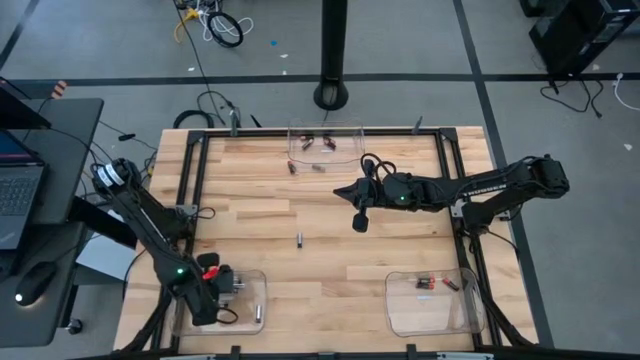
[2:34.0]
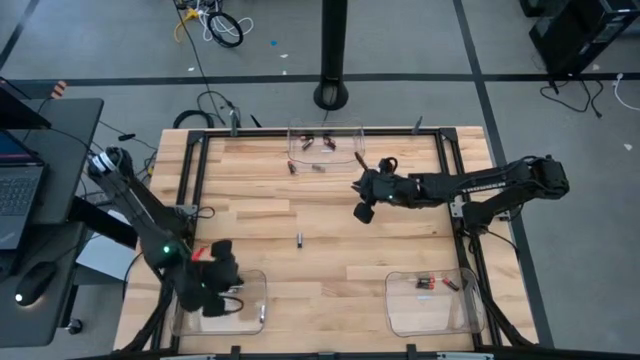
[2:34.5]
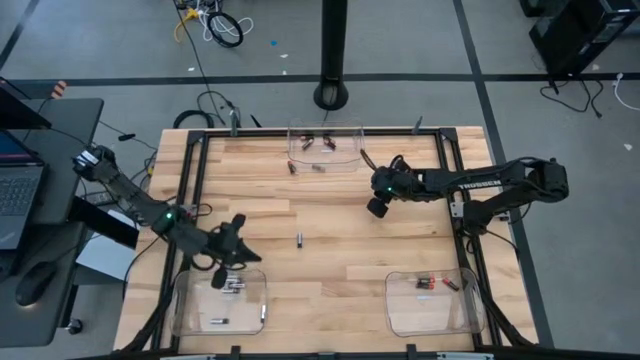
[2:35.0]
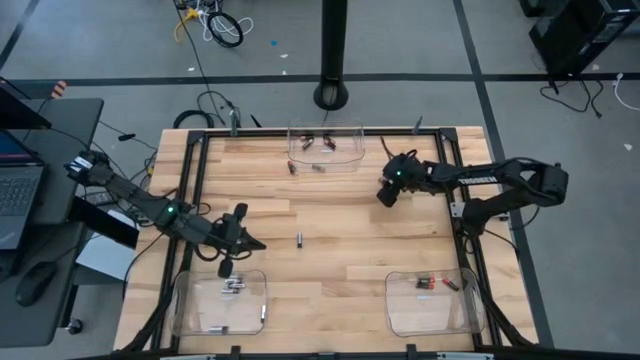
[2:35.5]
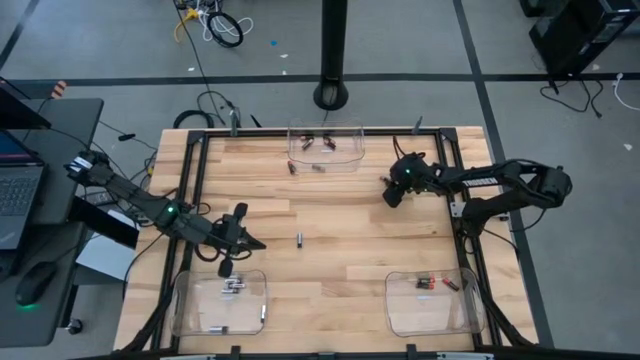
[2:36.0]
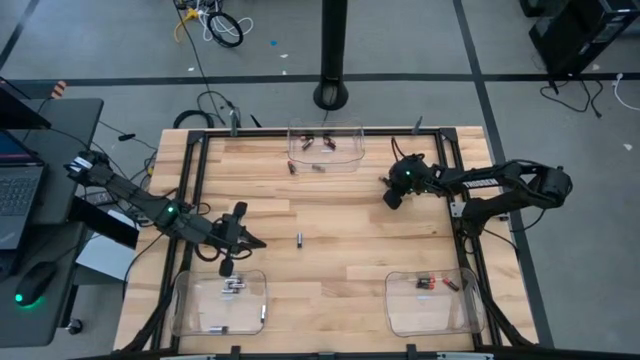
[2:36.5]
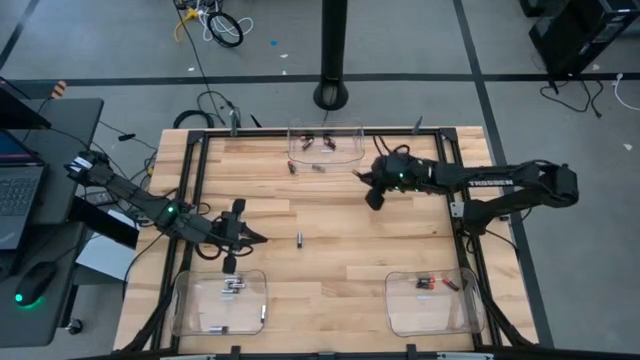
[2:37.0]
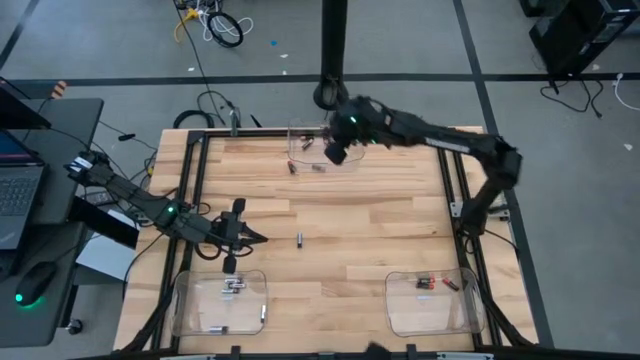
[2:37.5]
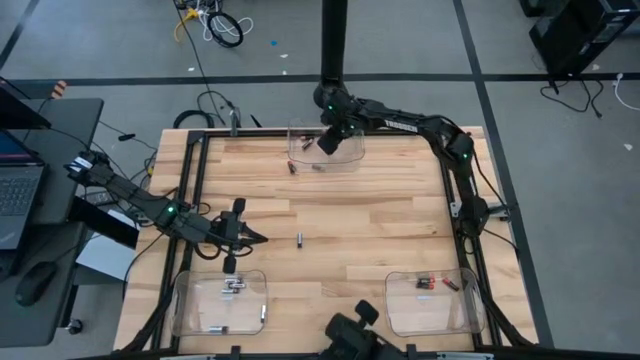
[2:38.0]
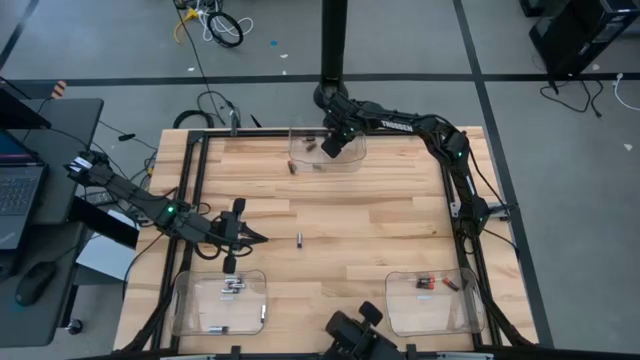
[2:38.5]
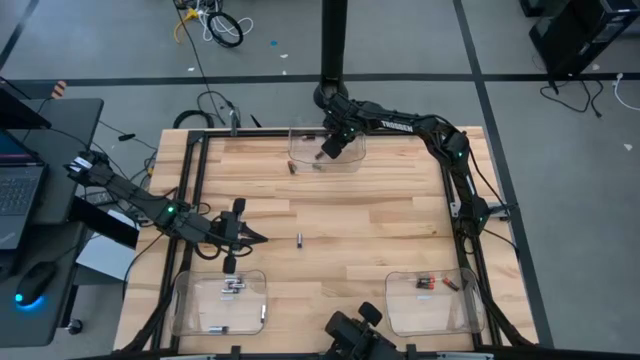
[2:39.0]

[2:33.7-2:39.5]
Task: Sort batteries
Put the brown battery into the top middle transparent bin

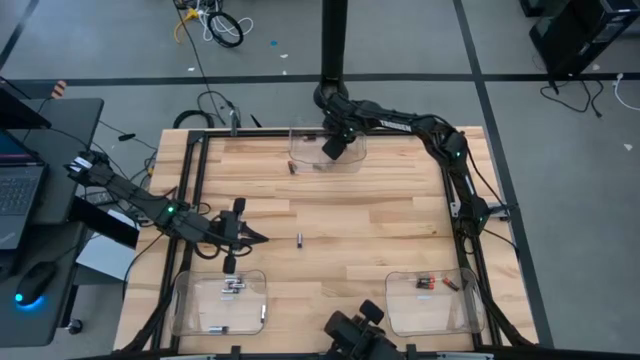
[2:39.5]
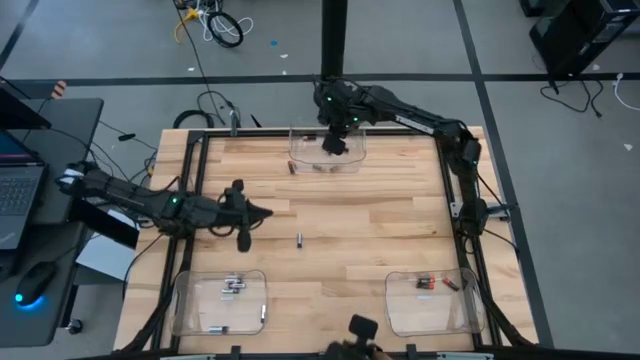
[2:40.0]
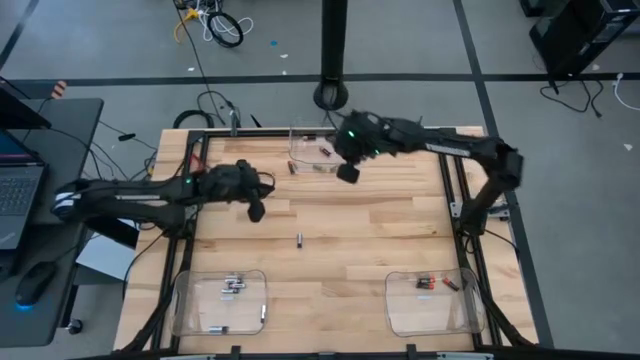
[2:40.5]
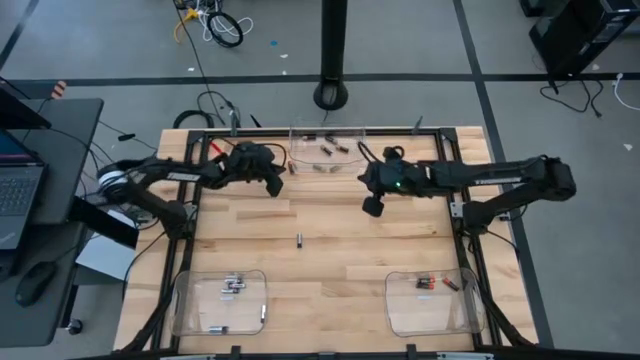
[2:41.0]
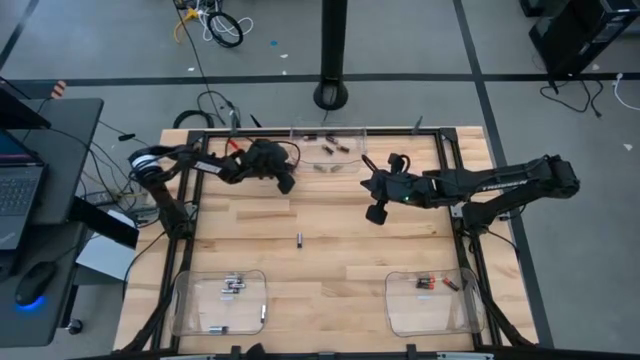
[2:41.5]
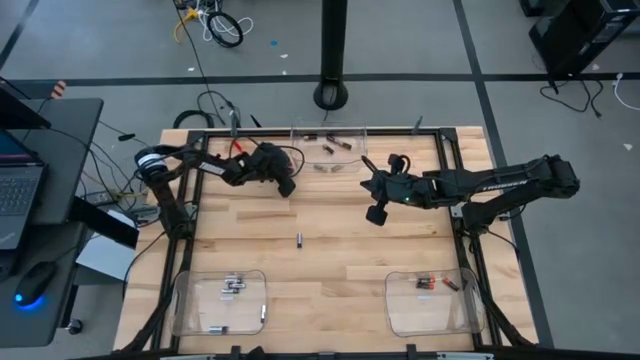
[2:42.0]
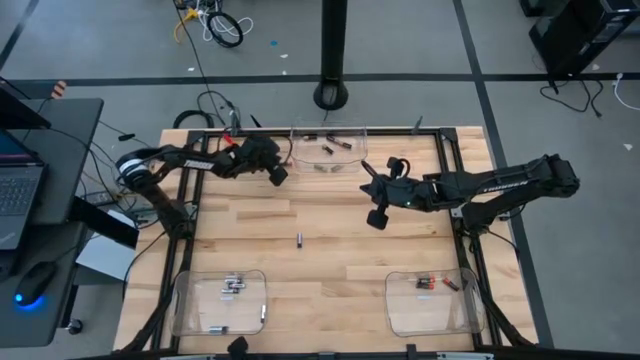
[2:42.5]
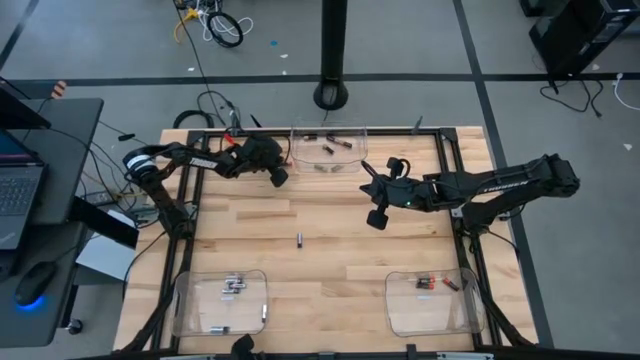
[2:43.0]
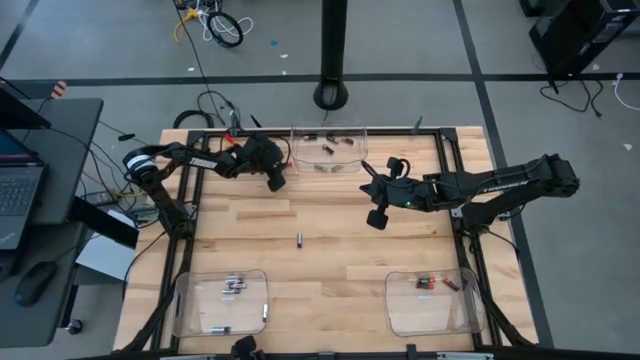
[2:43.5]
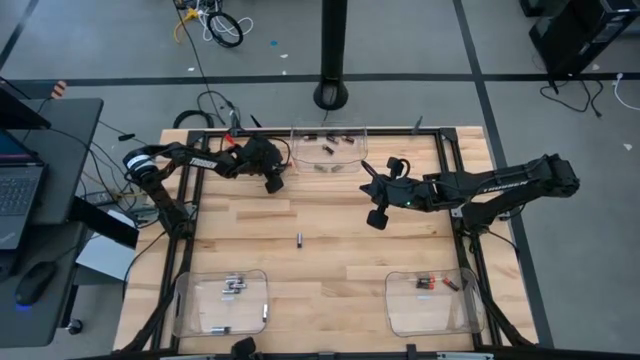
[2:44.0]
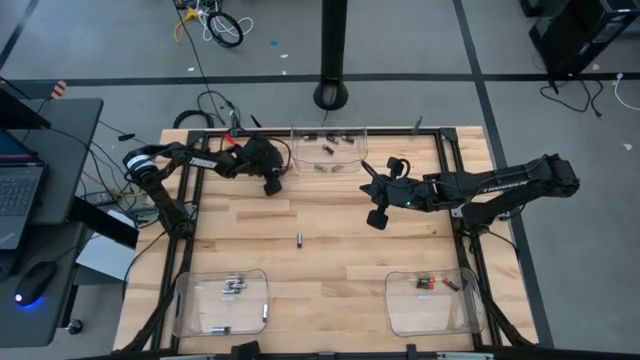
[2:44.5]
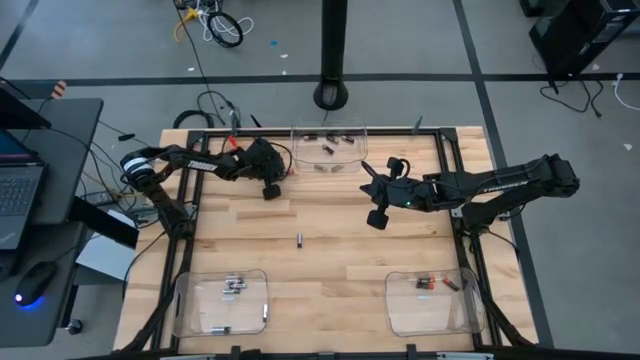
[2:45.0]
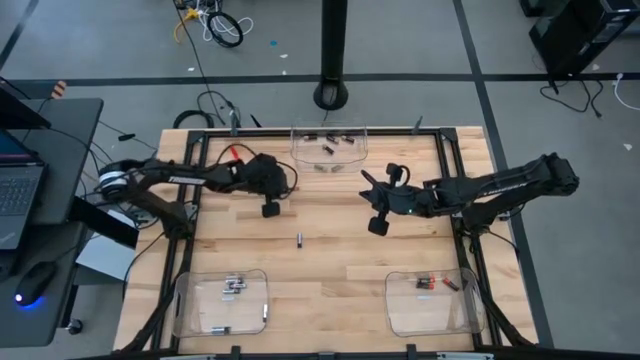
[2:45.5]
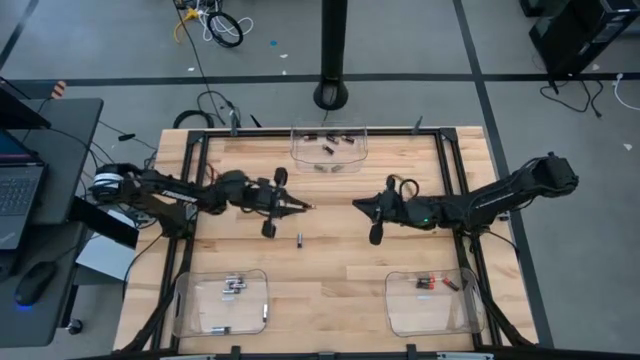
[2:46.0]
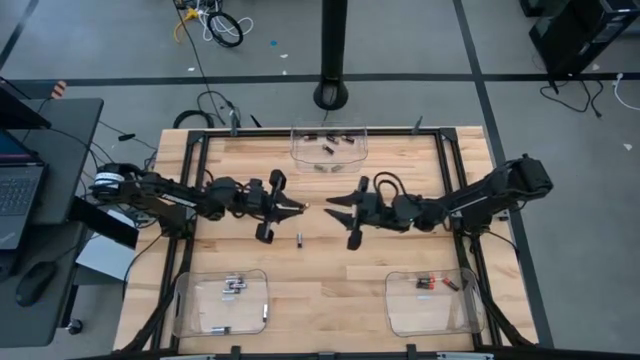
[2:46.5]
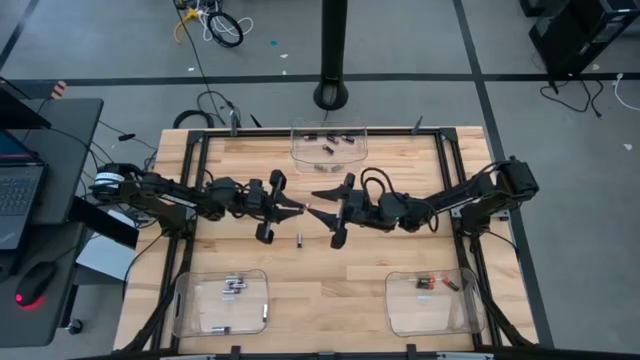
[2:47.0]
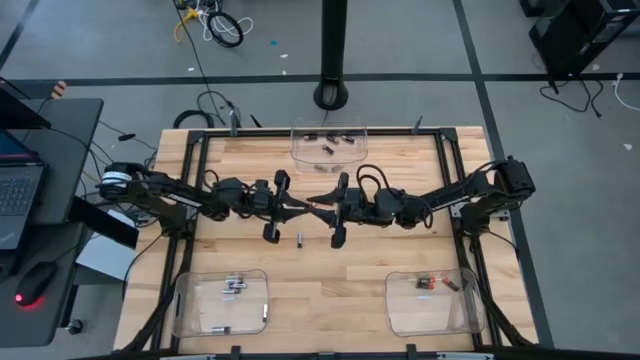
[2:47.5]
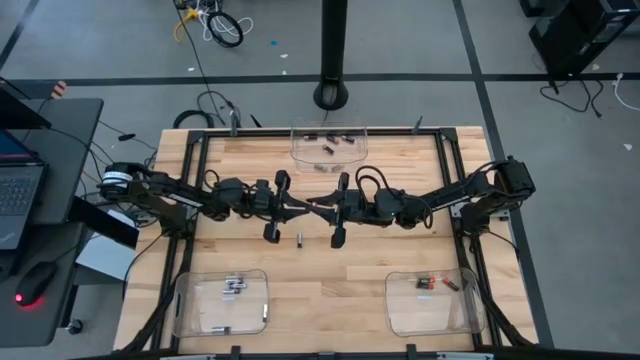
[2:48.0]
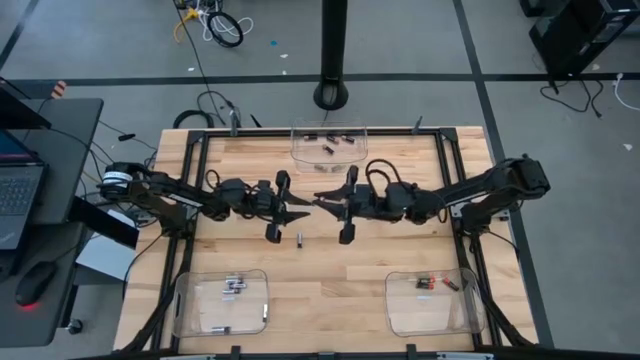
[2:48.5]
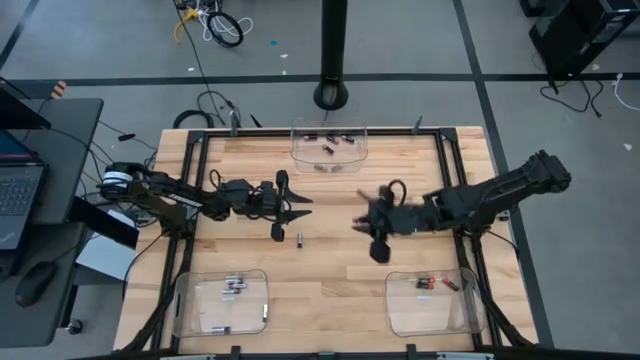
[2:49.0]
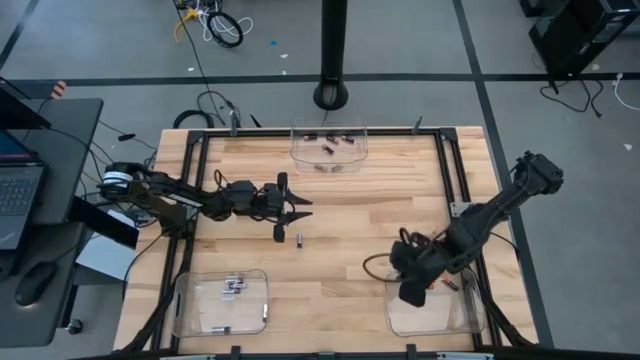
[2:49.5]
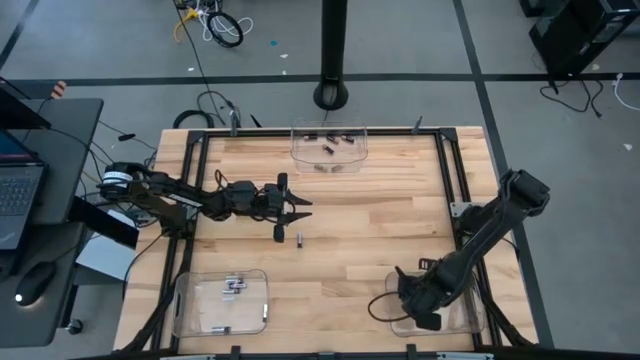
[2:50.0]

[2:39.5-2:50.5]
Put the red battery into the bottom right transparent bin

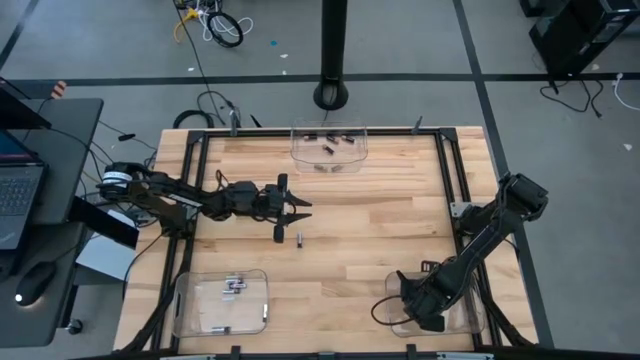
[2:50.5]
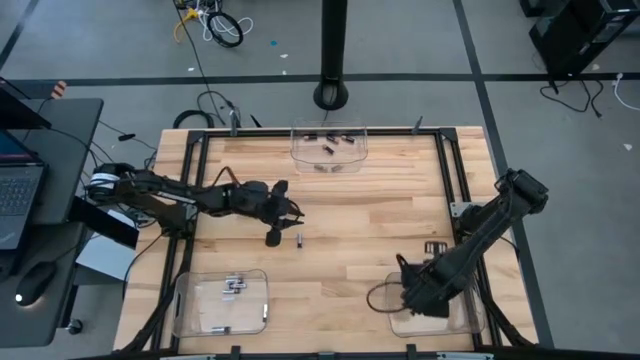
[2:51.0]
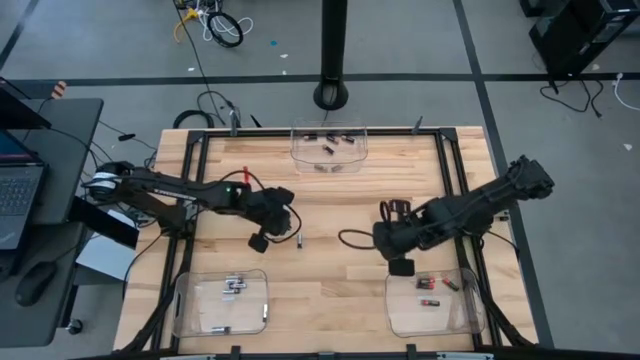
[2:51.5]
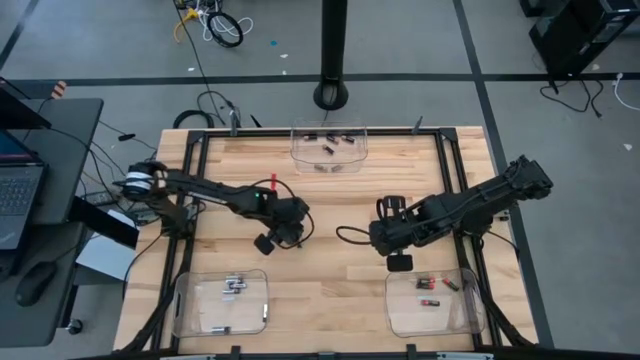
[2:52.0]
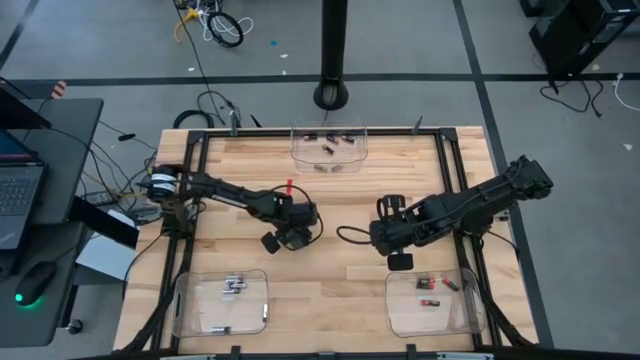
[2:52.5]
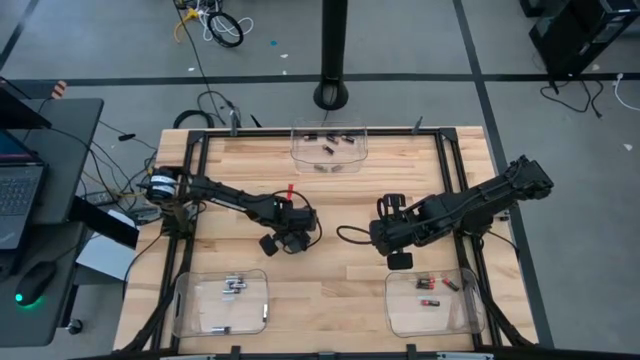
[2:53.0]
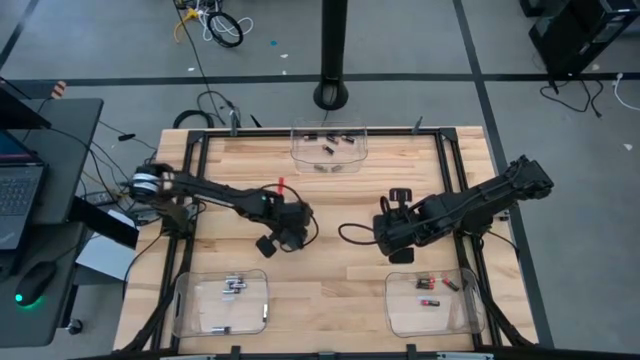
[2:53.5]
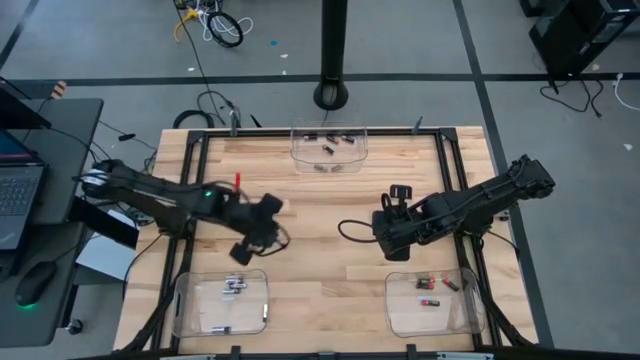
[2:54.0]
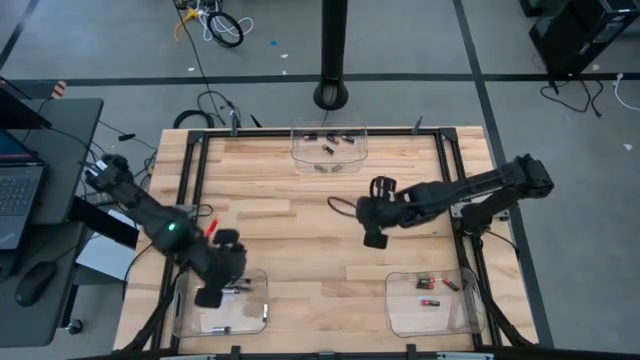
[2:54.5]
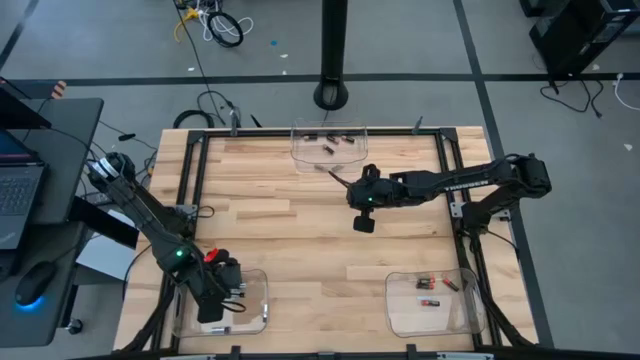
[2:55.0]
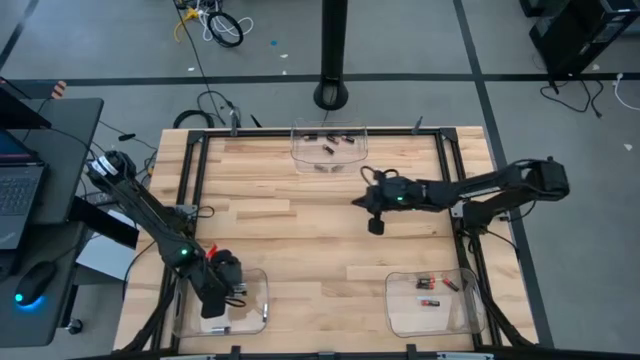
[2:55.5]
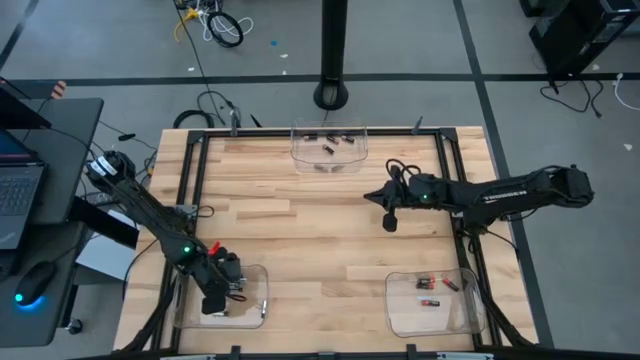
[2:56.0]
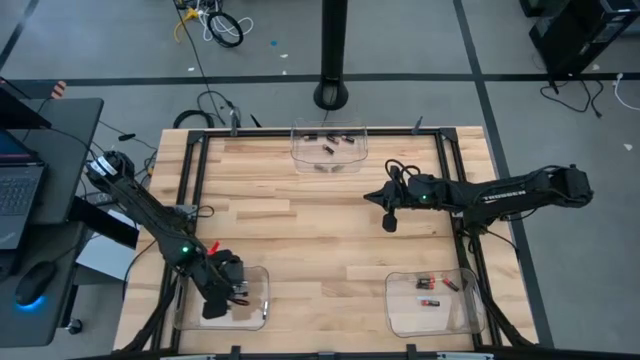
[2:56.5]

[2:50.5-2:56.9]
Put the silver battery into the bottom left transparent bin
